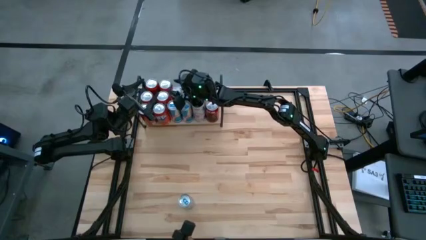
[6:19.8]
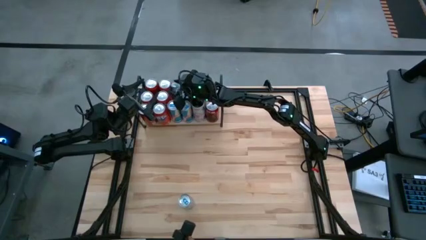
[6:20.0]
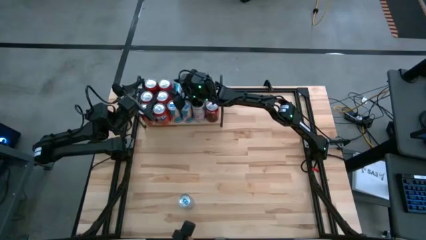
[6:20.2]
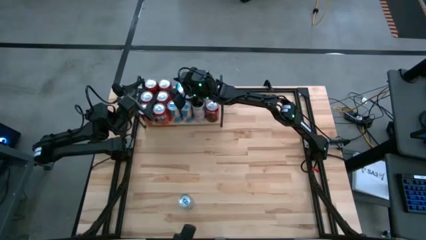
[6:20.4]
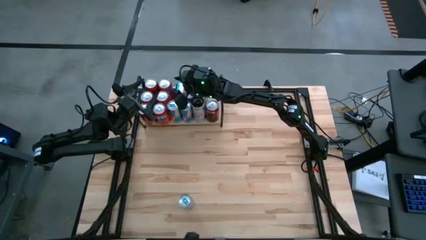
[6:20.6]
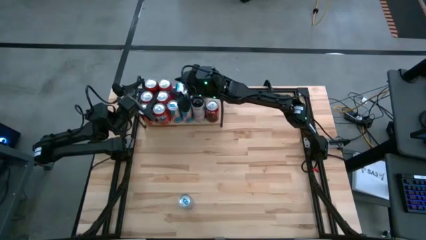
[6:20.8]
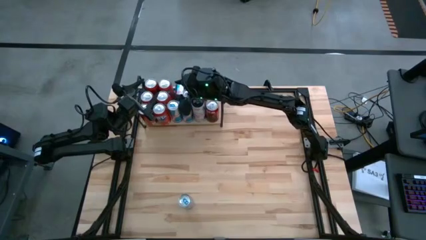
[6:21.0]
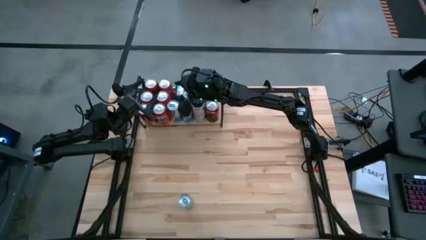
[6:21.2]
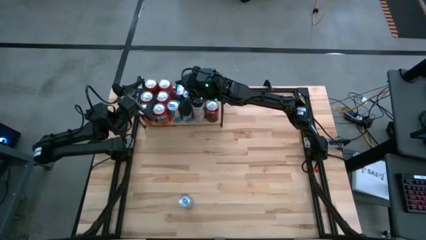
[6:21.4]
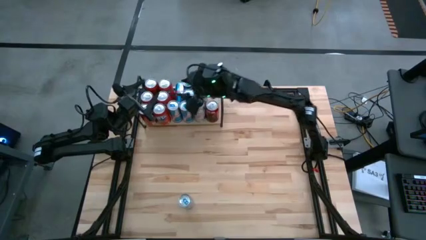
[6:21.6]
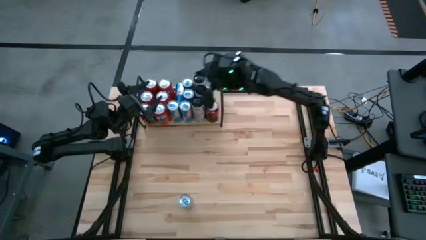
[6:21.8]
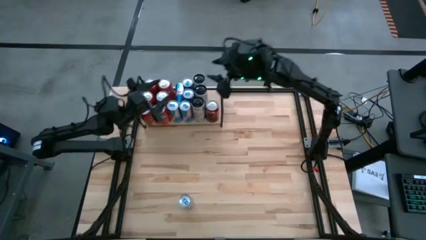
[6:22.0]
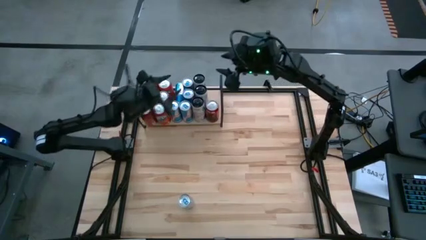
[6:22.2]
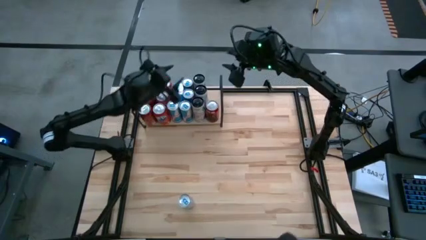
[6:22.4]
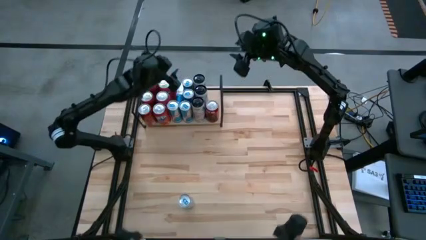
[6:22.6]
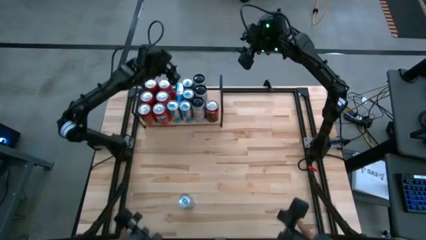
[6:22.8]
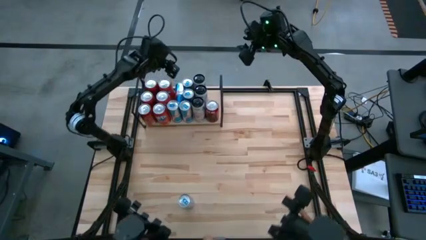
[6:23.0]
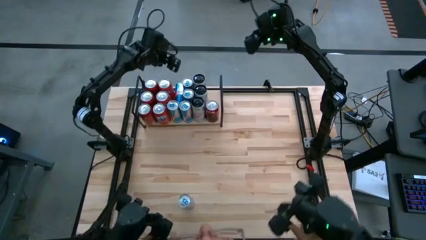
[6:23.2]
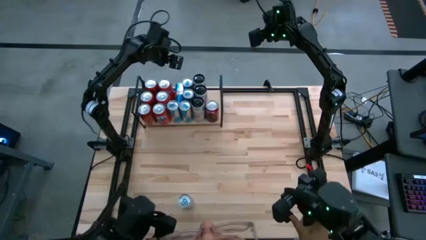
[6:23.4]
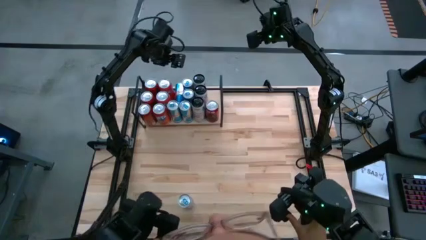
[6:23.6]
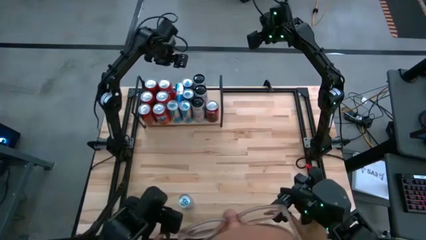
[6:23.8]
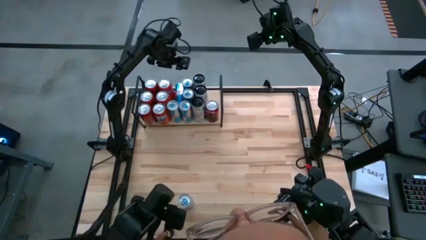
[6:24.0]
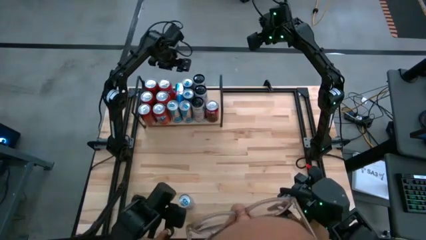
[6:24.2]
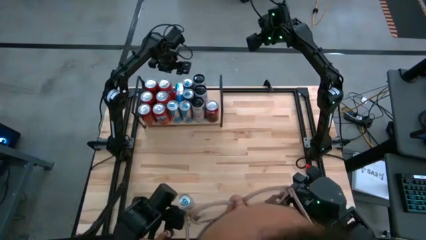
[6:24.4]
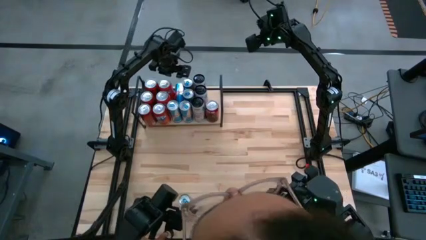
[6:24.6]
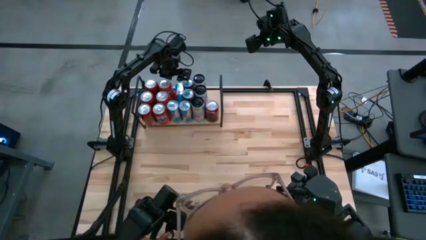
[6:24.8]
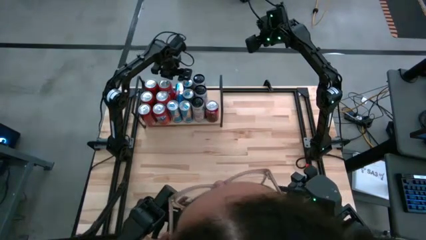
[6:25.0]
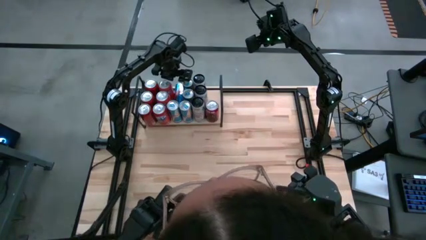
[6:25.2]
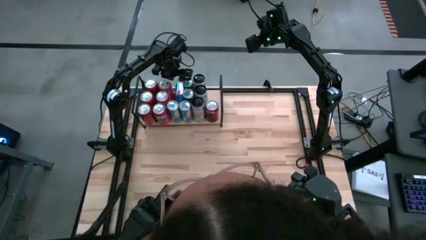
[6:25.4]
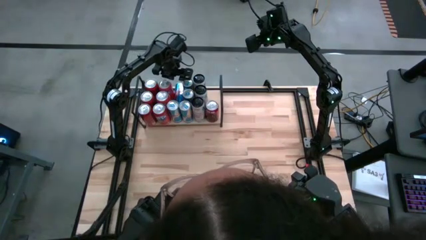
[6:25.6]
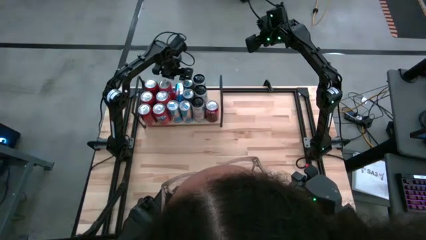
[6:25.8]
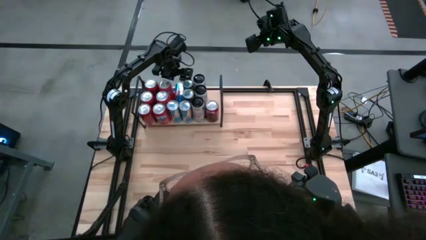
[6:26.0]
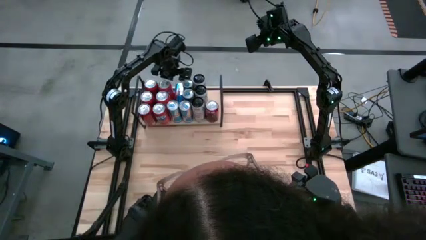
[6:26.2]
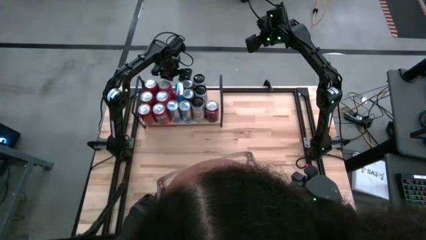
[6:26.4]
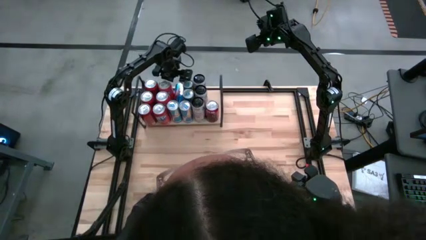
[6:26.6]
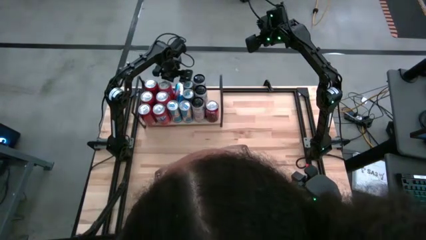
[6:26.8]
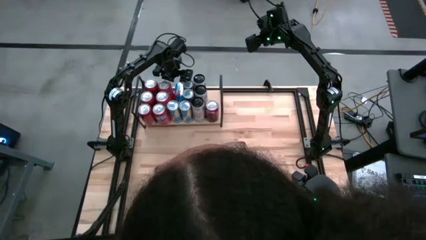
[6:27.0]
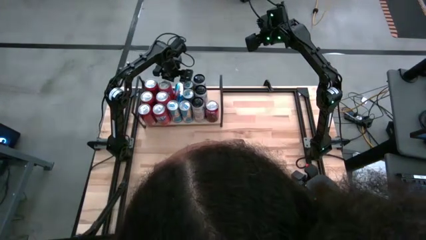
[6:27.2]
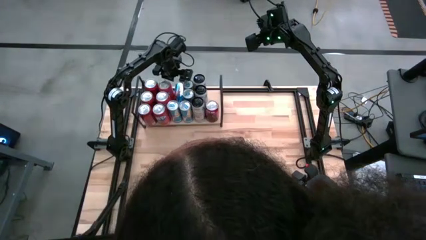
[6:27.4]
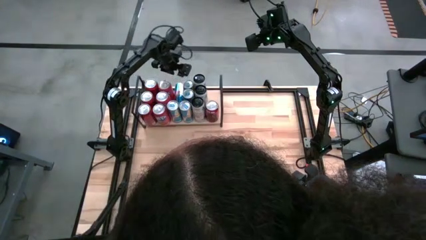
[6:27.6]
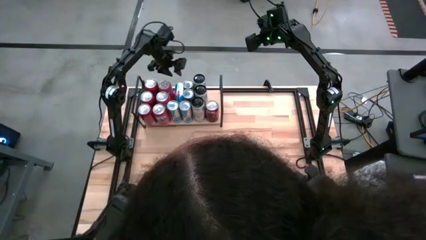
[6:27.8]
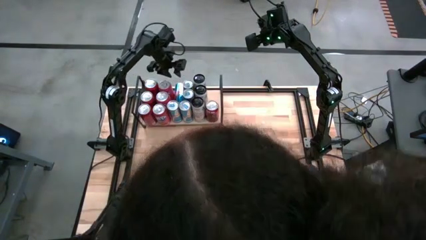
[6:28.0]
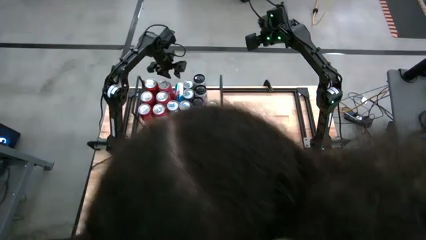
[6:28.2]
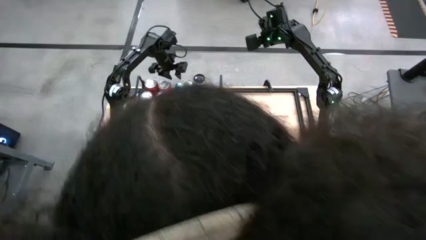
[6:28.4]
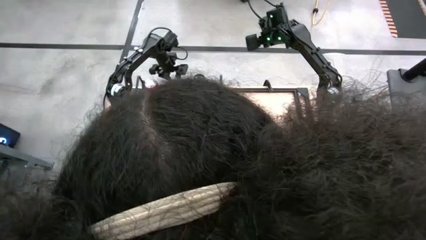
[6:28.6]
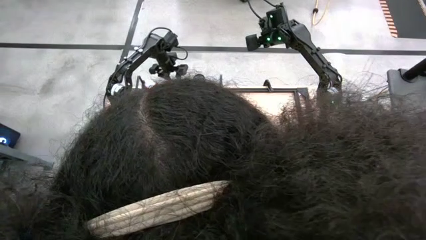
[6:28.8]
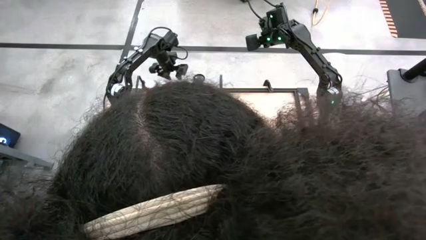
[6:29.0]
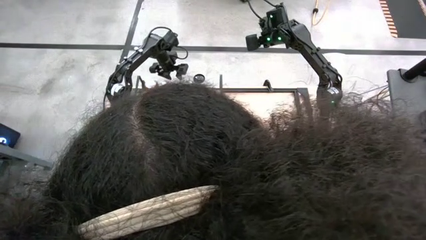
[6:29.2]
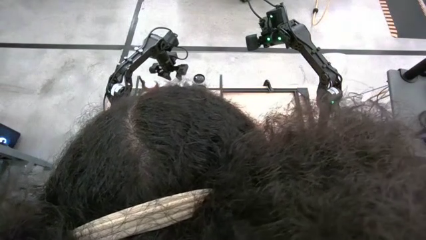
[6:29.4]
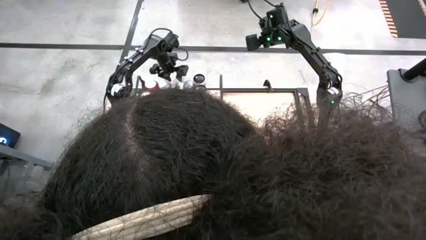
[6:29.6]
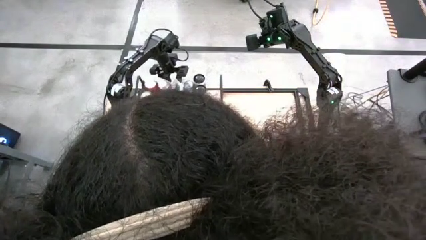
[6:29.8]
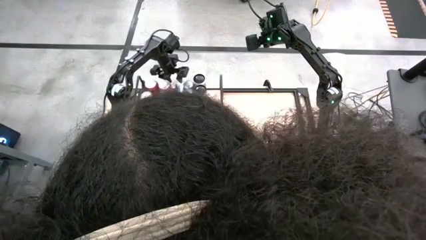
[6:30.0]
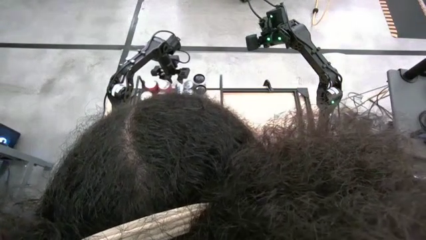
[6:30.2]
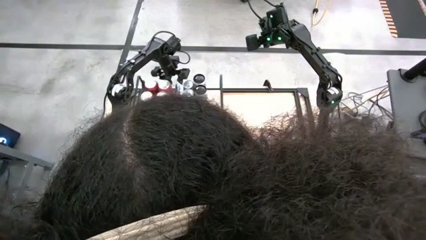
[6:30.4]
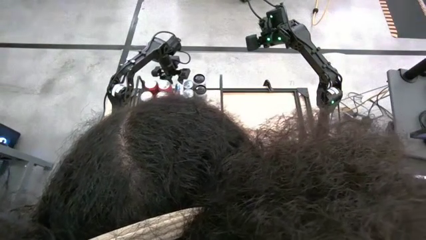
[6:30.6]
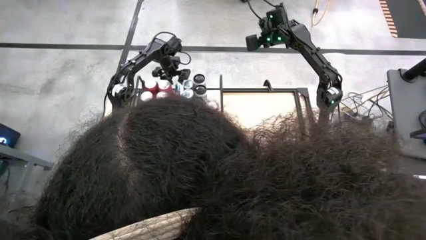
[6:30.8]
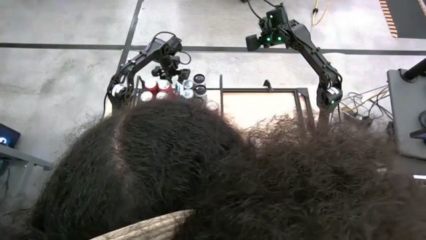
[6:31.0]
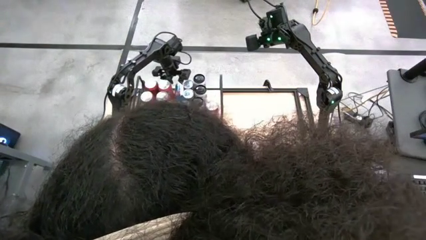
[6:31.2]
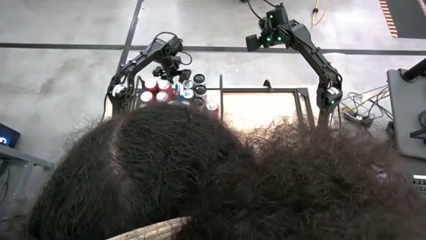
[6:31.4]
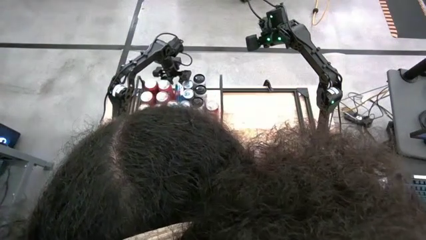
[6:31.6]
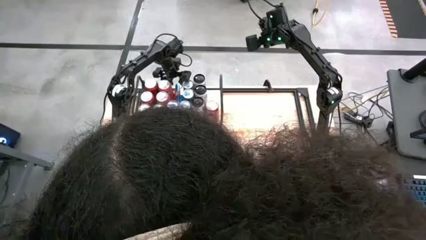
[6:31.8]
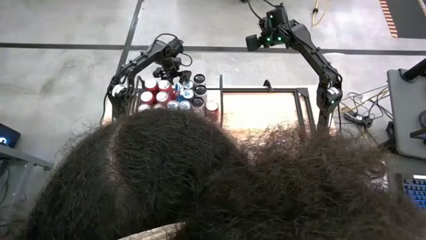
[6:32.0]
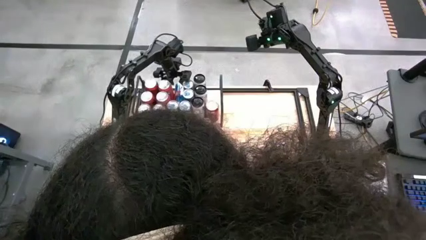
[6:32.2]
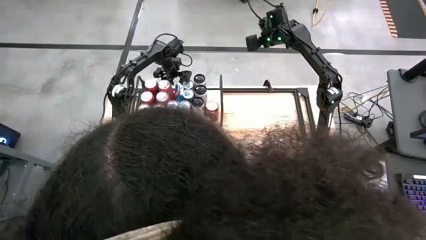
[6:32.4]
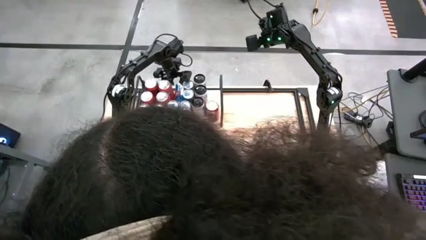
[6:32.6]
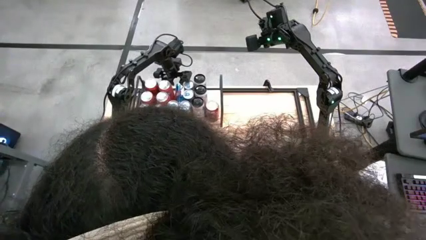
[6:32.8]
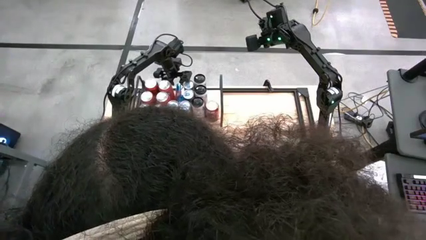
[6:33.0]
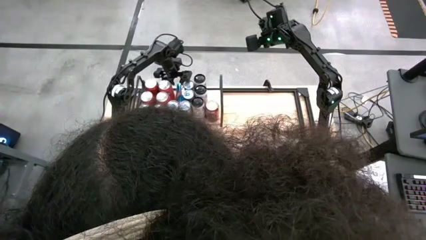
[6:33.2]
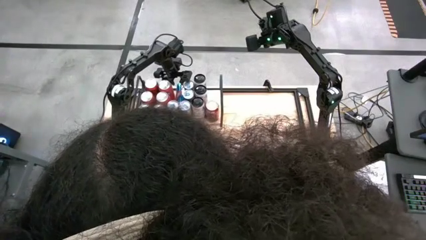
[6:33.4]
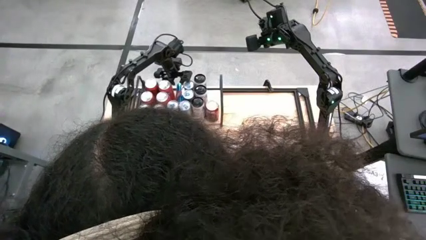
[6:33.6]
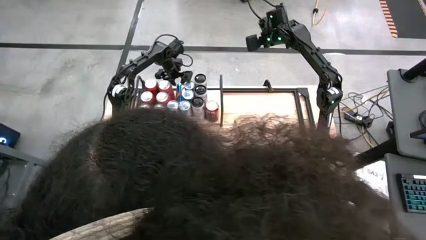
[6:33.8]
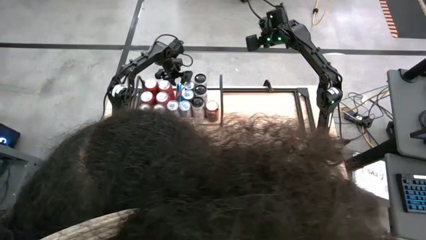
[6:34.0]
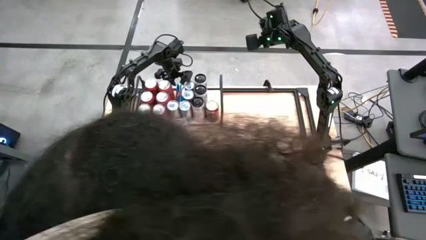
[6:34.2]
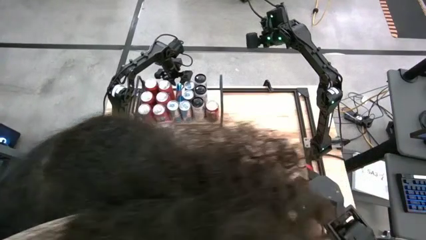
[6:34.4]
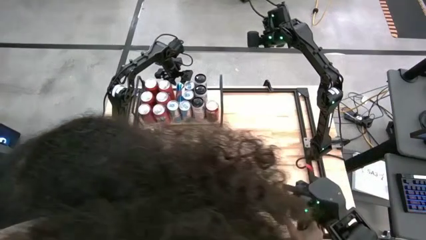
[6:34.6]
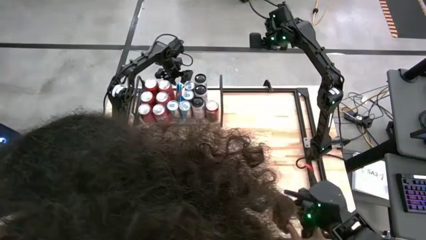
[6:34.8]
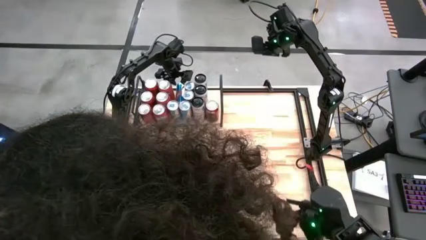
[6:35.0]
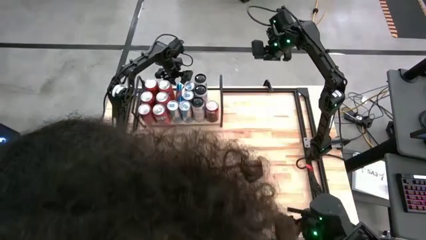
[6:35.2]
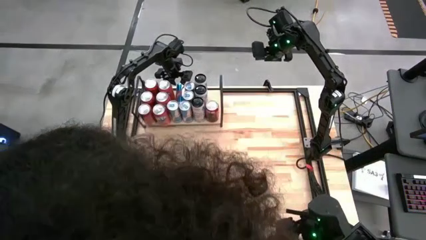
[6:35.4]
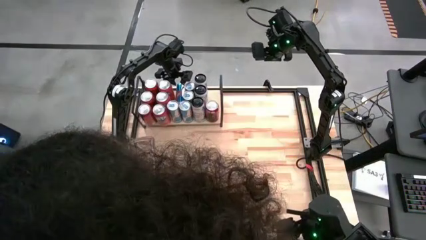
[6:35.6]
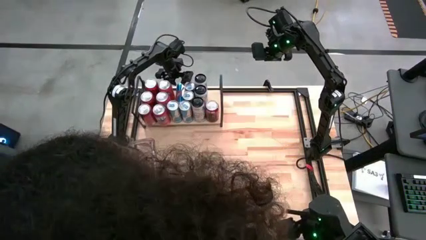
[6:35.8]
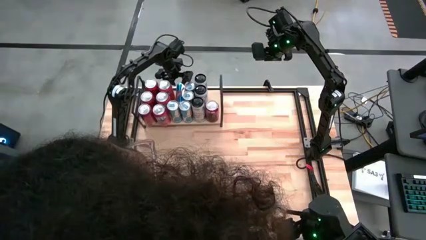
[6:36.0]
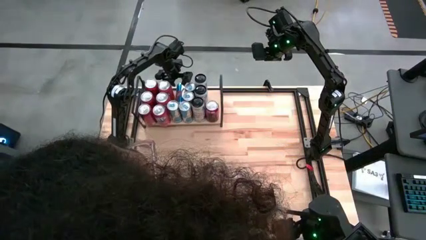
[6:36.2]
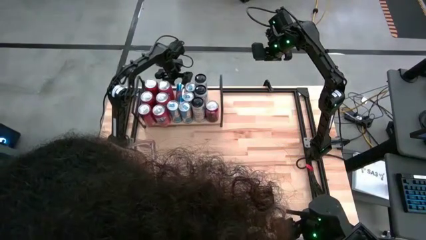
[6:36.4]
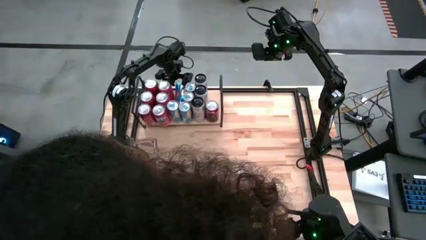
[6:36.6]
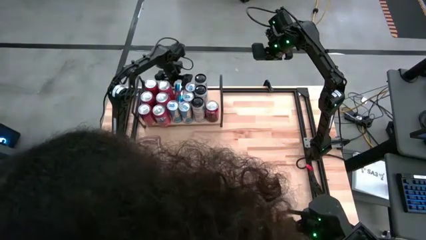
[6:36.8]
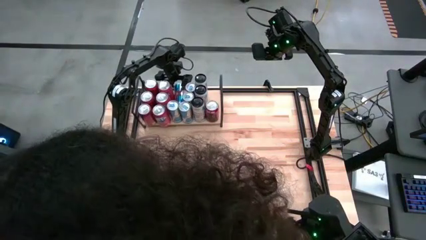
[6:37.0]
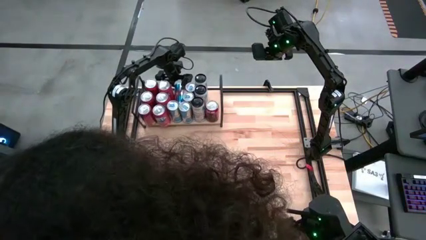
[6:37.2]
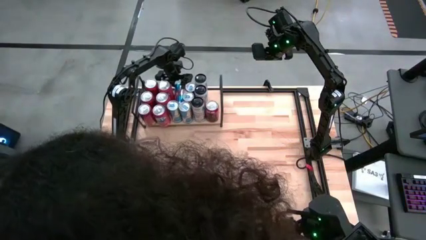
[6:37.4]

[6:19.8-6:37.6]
Task: Place canned beverage on shelf
Put the blue soda can on the shelf aligned with the other blue soda can
